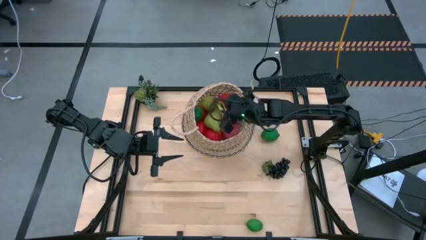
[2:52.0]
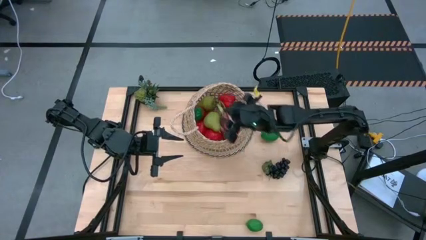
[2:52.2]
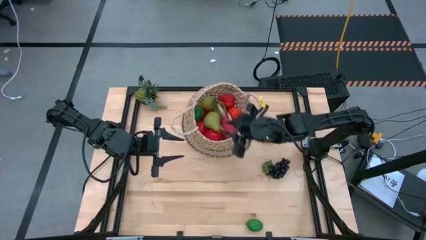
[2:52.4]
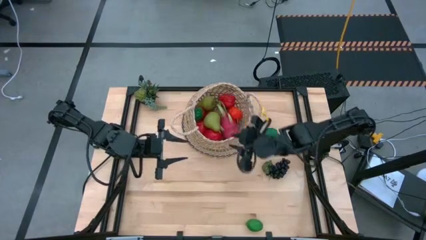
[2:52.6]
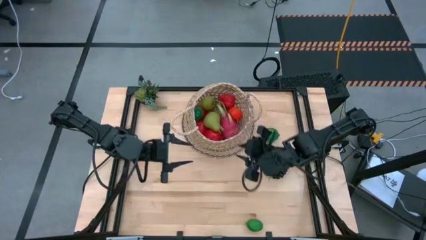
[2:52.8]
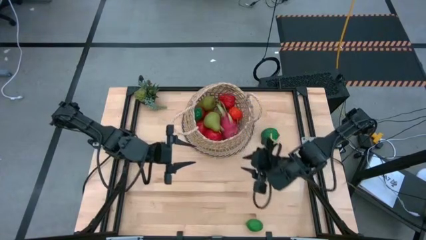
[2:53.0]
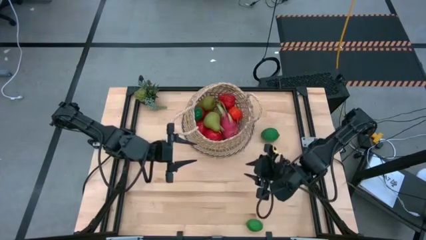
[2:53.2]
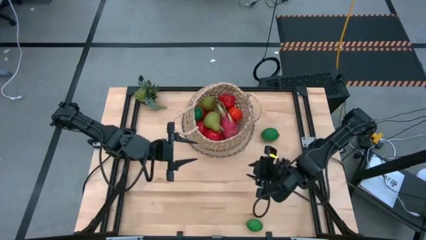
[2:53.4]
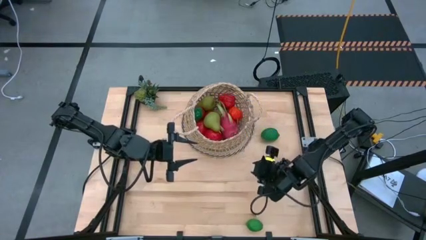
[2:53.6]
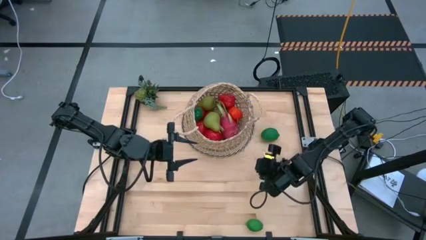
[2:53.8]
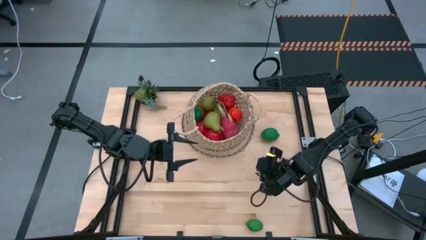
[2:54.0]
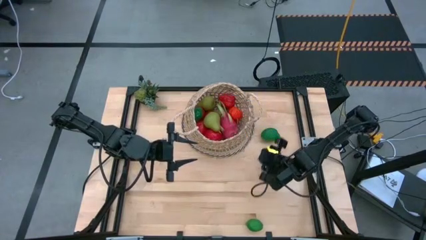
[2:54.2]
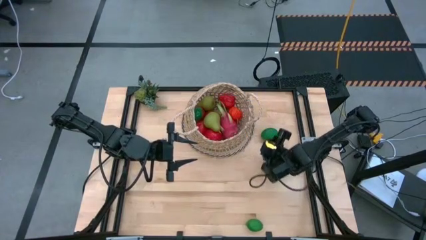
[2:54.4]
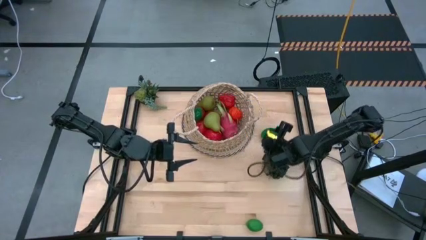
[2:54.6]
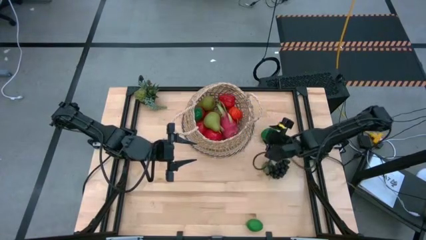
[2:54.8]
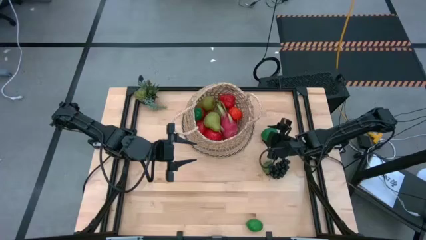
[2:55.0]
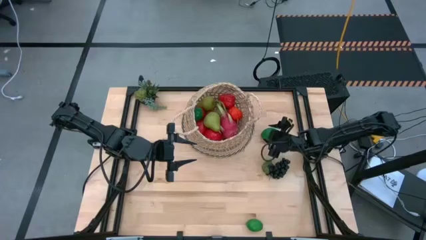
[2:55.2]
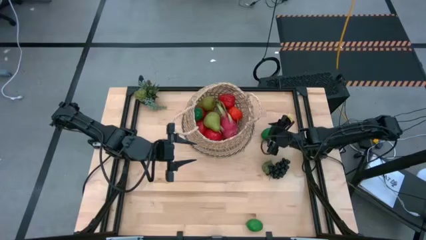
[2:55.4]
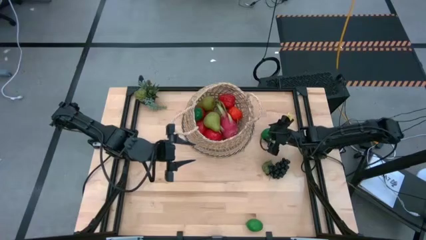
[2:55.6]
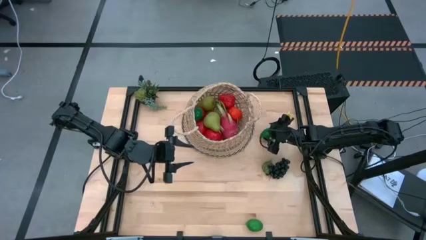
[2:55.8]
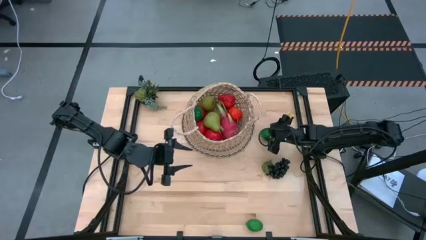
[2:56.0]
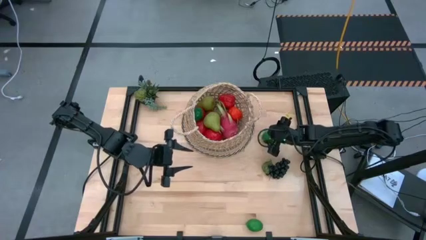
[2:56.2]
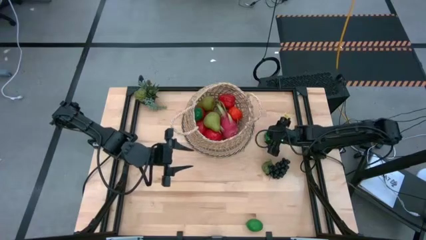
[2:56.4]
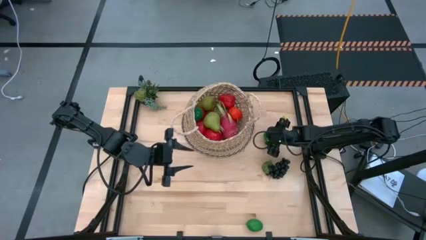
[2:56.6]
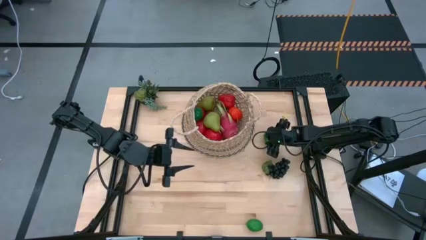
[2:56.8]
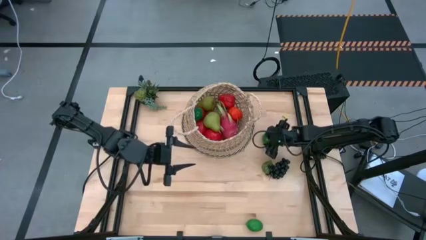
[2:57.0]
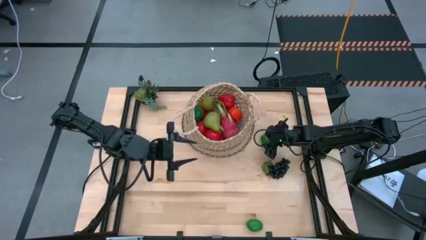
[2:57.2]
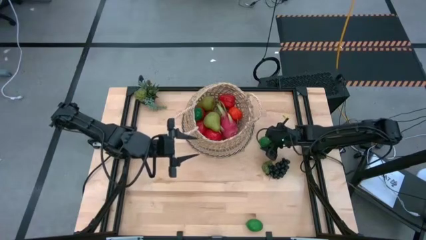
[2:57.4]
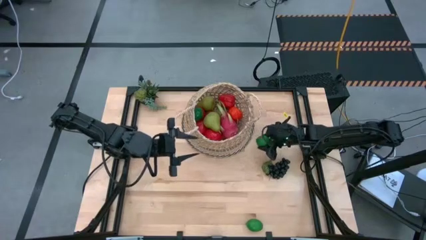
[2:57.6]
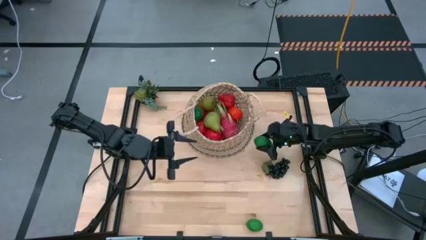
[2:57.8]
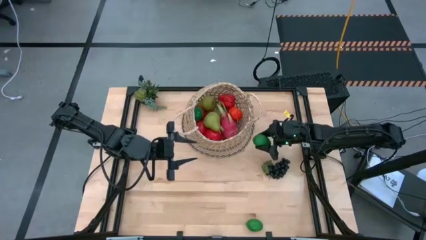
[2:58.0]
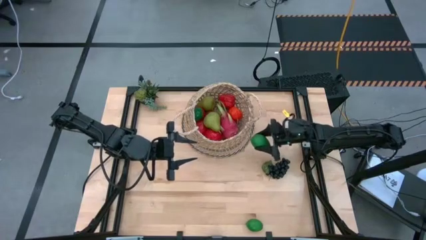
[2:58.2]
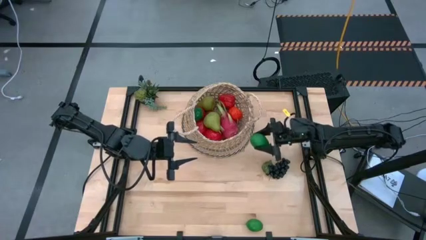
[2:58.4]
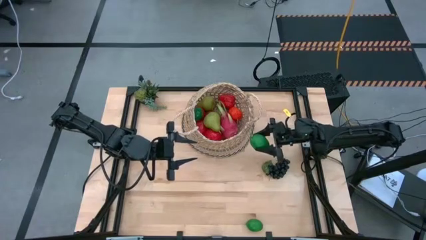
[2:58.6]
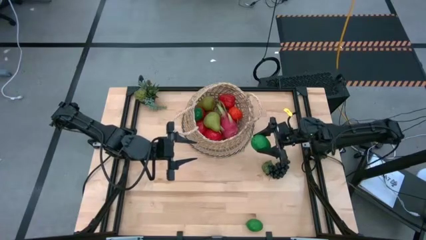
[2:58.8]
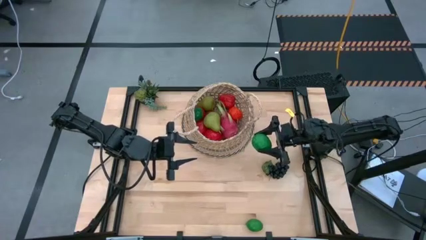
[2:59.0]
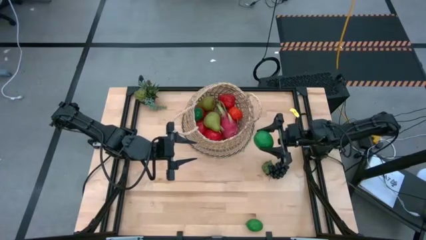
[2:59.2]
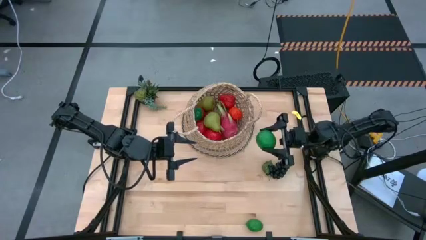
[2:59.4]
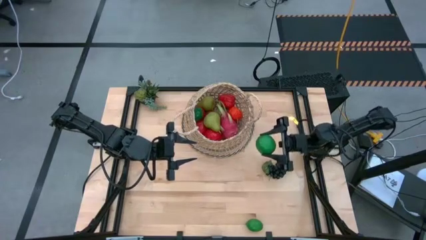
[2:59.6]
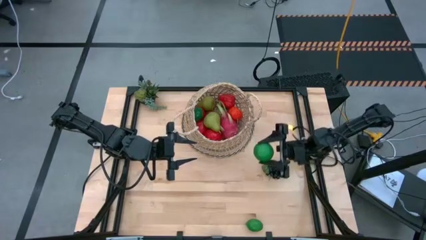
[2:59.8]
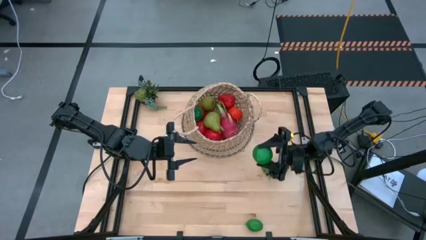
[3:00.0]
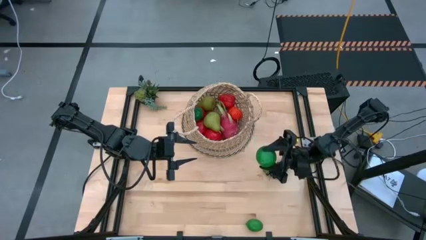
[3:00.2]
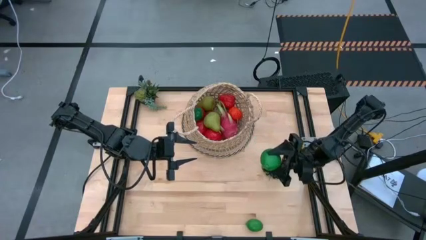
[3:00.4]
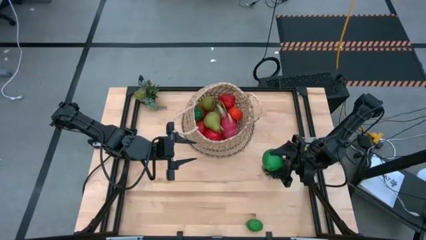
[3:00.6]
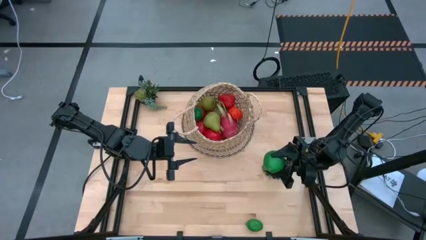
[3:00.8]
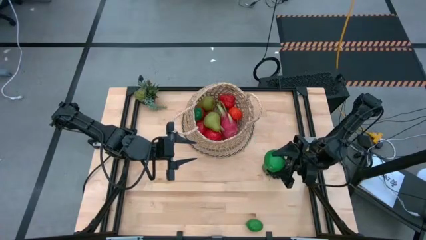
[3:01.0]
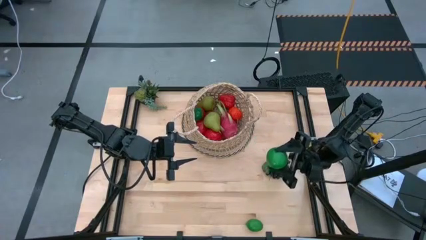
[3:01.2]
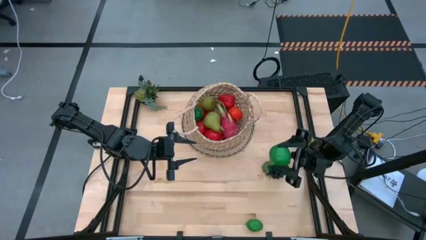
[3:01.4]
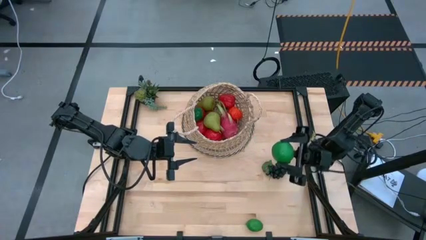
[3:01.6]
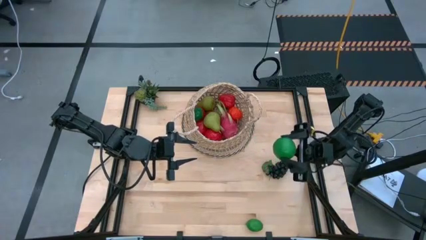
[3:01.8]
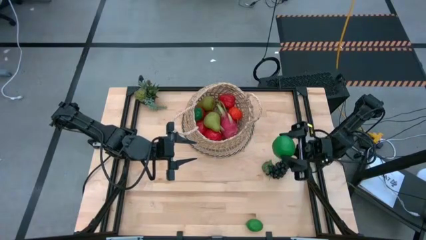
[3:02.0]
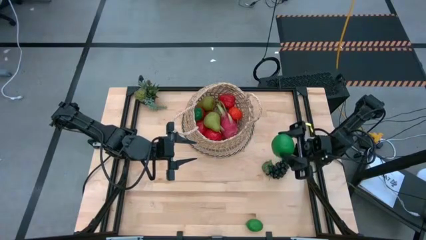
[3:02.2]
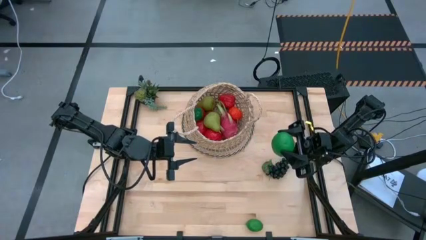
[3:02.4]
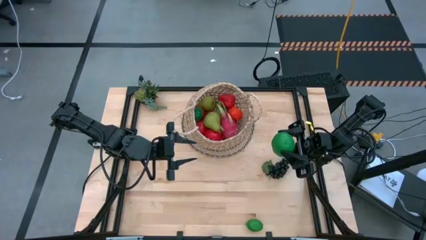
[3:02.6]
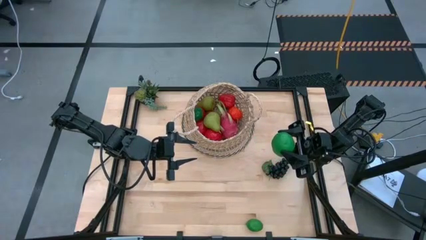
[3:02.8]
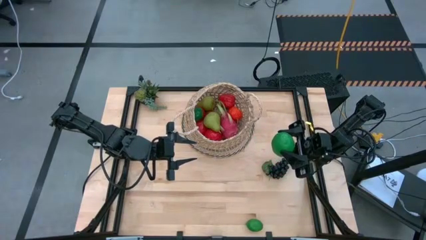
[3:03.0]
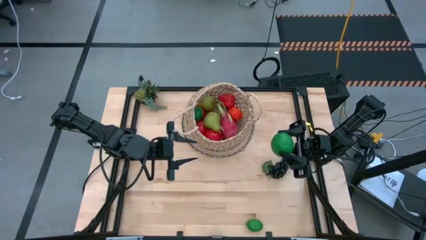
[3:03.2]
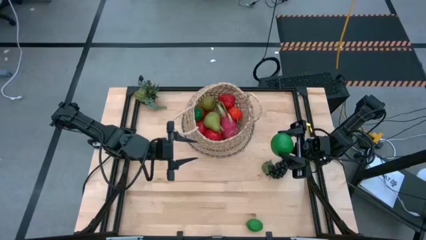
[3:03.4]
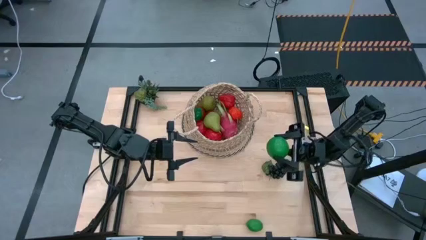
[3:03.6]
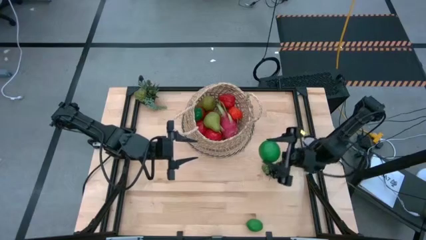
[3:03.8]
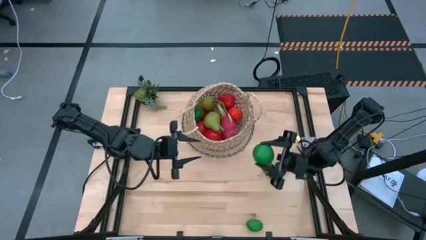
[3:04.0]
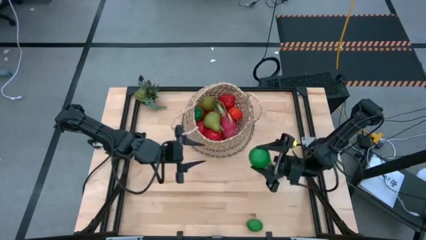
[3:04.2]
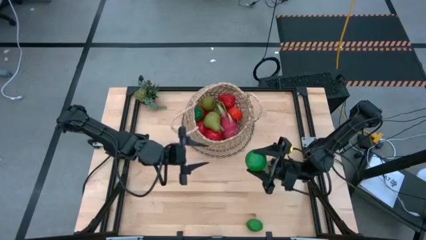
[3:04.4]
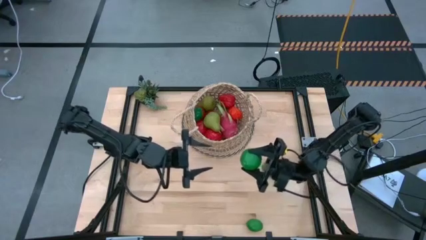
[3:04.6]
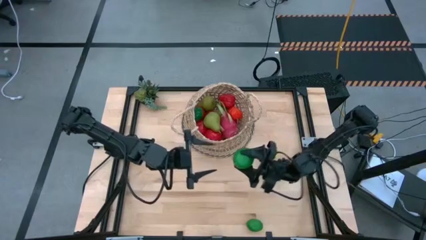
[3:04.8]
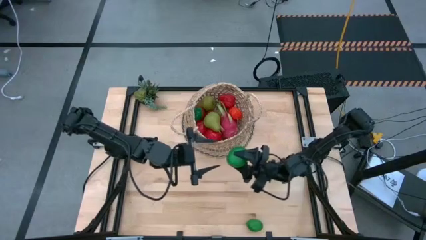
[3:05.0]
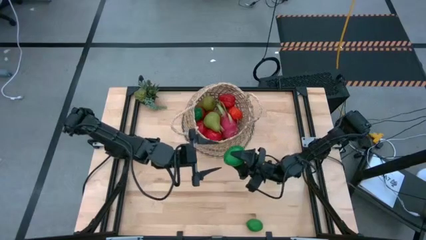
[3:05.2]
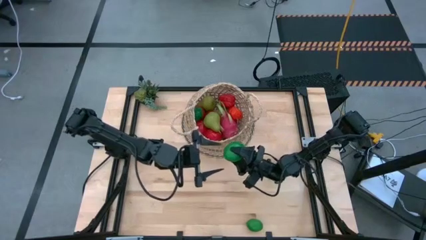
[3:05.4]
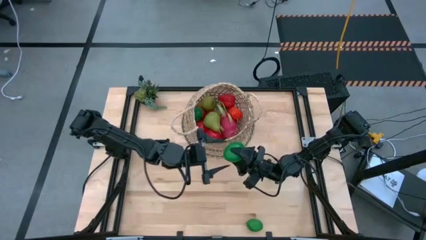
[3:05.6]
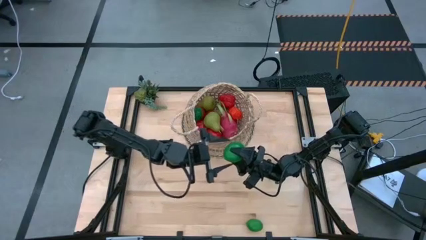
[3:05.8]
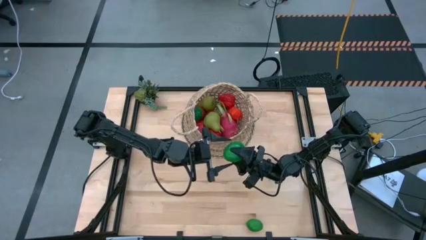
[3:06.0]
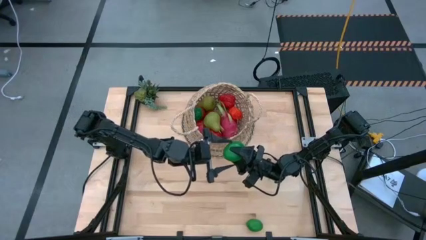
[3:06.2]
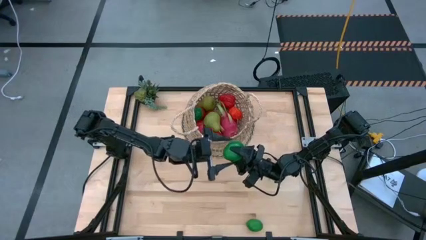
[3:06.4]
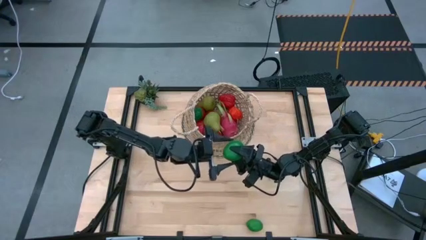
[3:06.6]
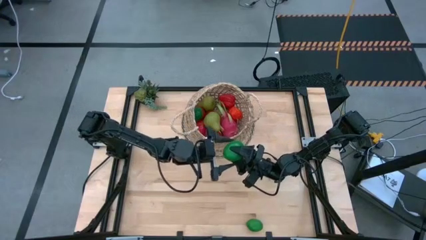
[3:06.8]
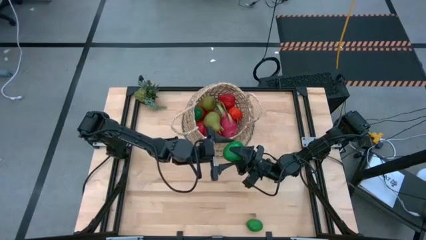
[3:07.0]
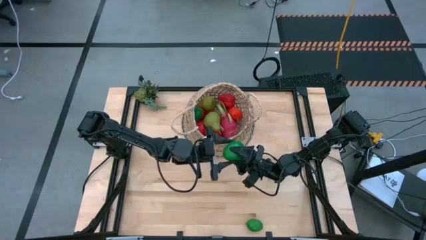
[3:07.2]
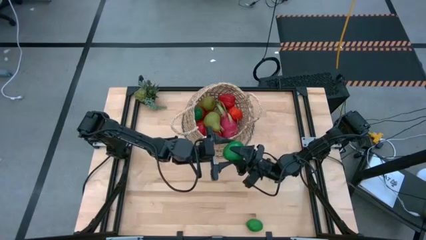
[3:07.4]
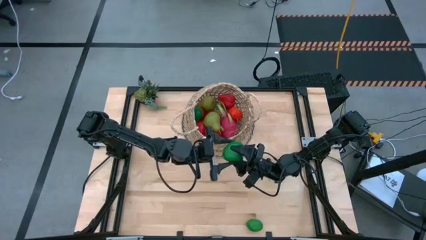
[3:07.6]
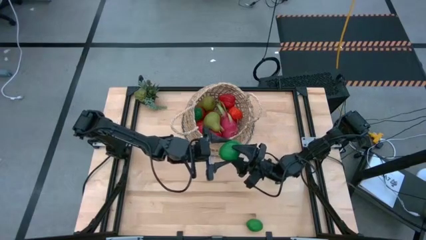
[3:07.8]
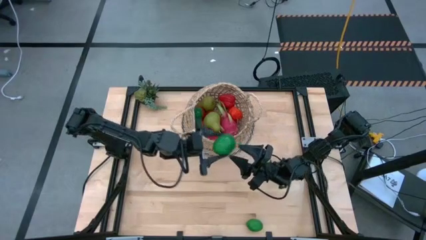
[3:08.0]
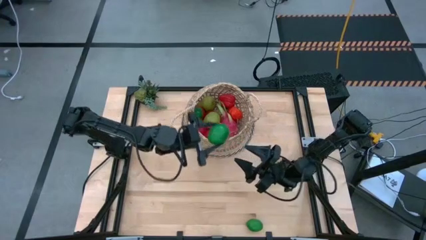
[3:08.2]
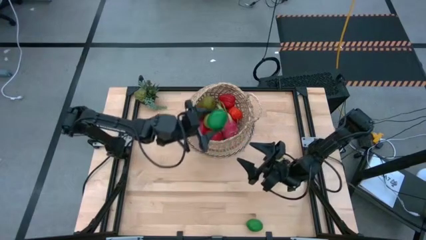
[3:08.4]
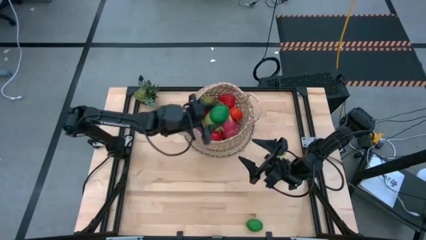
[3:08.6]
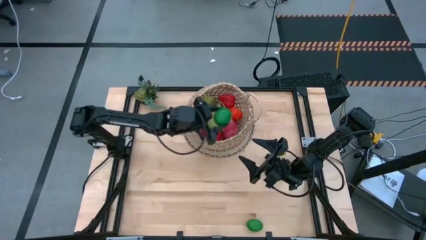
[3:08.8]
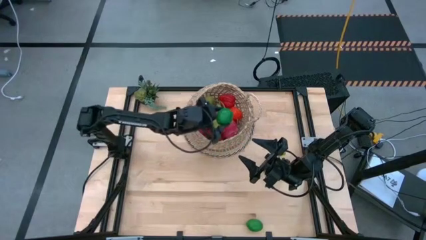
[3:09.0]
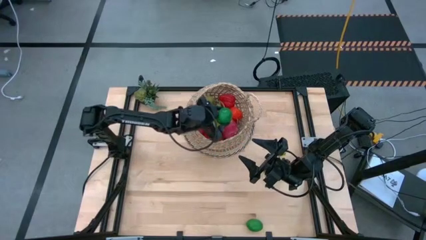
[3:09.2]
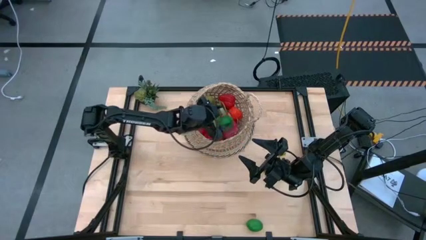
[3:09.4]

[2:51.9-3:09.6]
Task: Build produce basket
Put the top green lime into the basket
